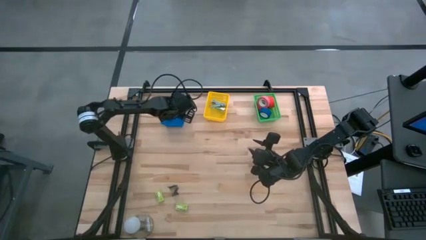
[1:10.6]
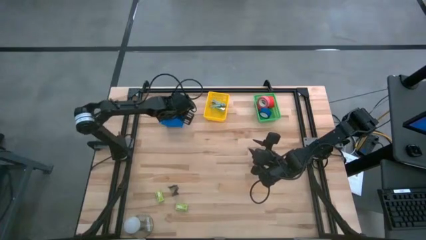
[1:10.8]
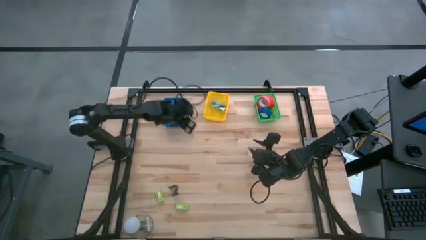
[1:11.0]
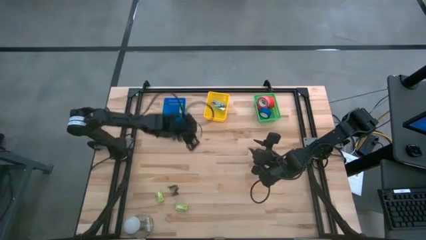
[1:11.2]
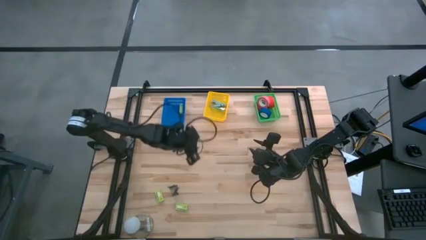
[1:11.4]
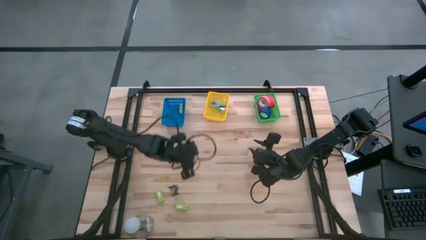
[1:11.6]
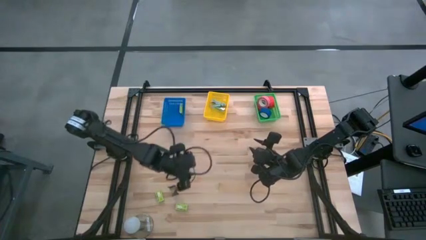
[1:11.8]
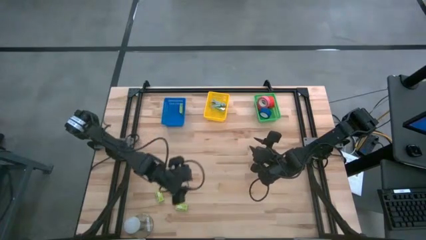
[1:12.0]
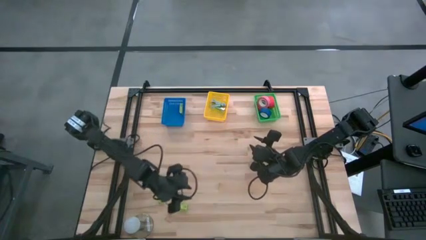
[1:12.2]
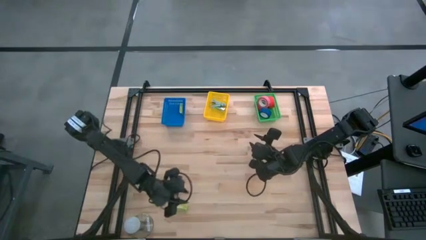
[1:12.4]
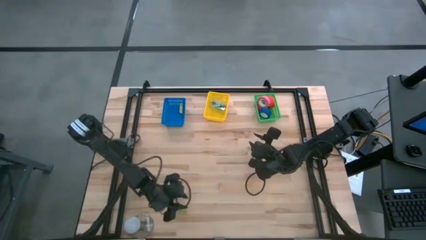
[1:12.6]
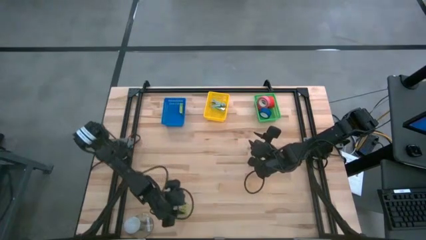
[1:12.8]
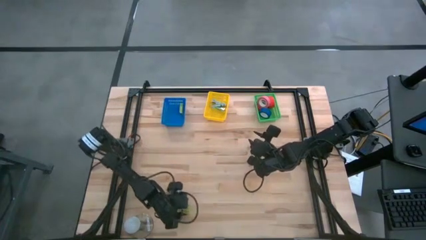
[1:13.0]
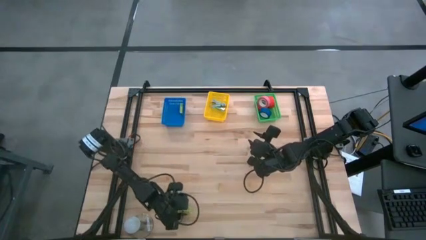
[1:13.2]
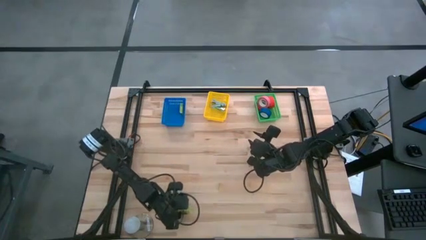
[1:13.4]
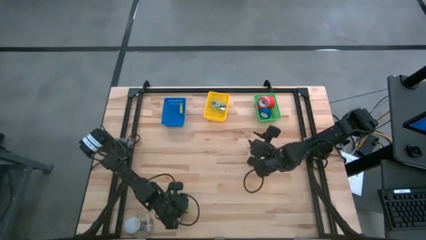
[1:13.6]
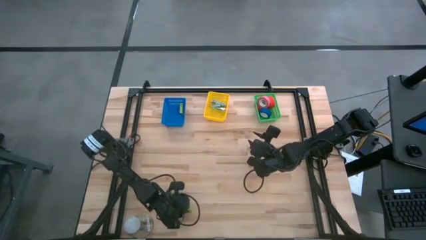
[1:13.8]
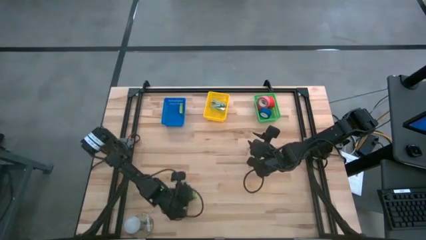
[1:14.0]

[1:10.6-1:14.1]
Task: Pick and place Stapler, Stapler remover, tape
Put the green staple box into the blue bin

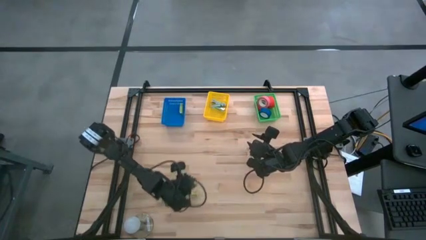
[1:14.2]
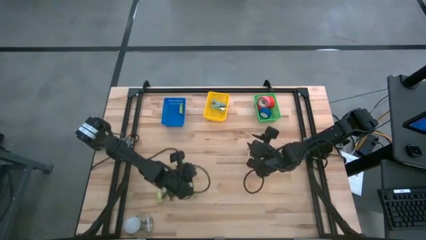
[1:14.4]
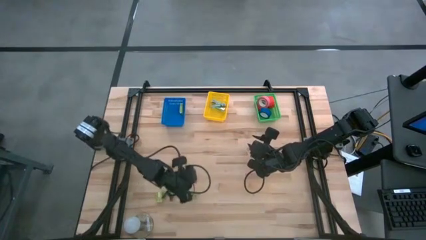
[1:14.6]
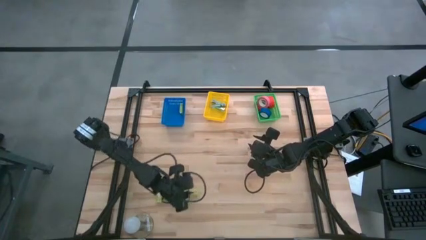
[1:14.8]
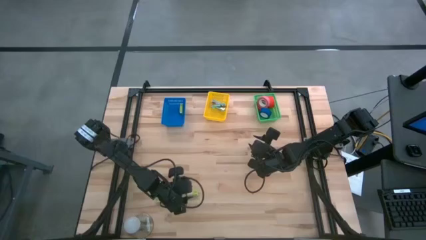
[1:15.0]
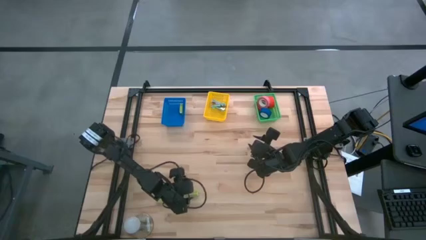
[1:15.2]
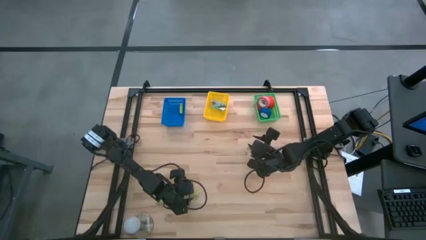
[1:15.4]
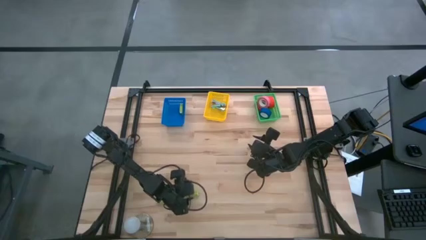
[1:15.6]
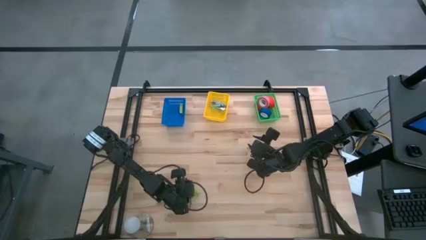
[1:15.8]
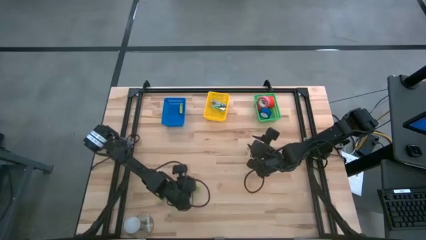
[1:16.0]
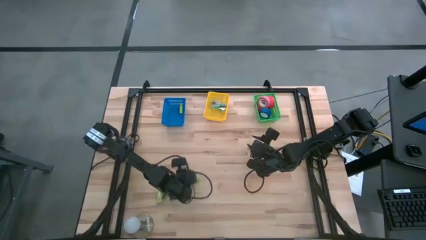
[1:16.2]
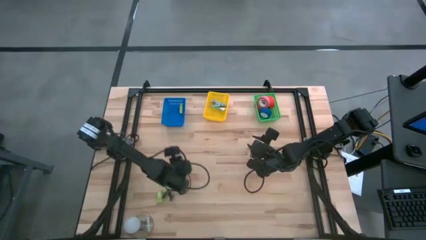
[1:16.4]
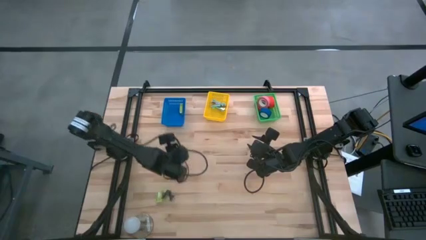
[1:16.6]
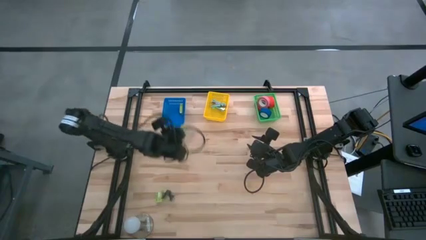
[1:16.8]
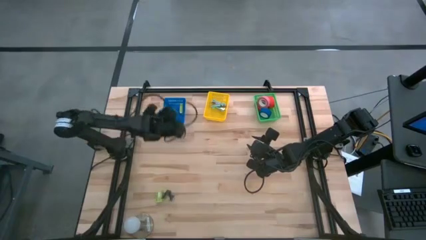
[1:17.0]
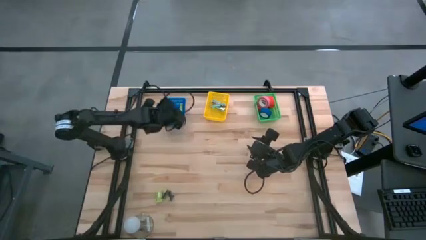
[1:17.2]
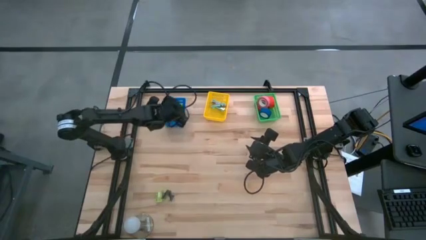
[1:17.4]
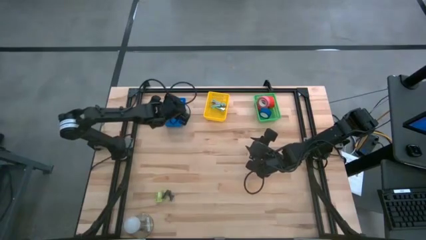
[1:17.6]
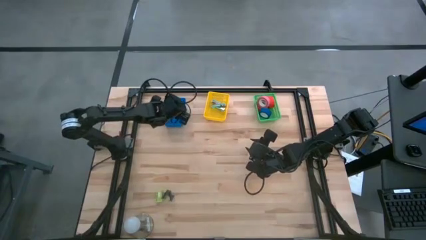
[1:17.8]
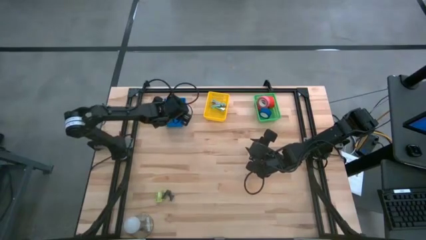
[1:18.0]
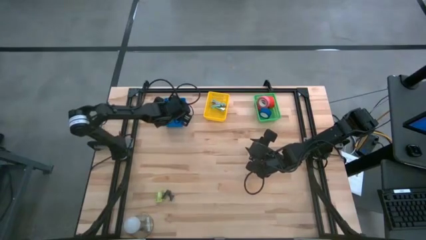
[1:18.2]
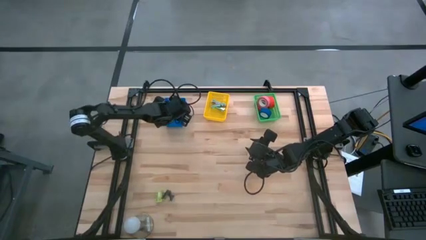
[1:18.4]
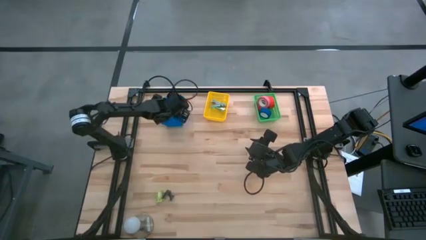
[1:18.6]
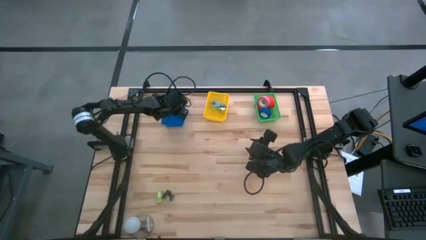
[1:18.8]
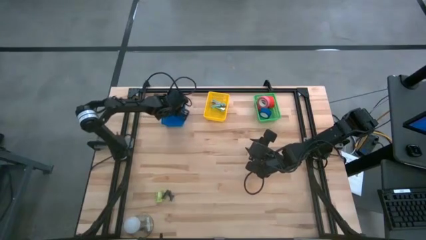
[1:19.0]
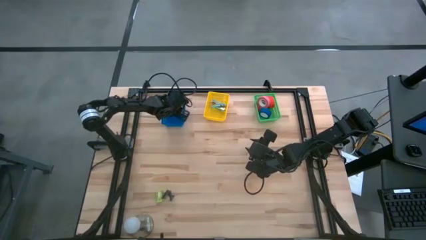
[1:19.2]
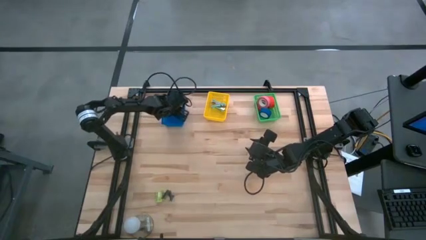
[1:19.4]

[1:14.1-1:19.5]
Put the green staple box into the blue bin

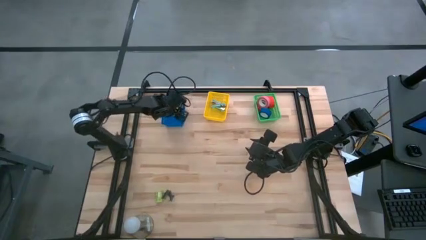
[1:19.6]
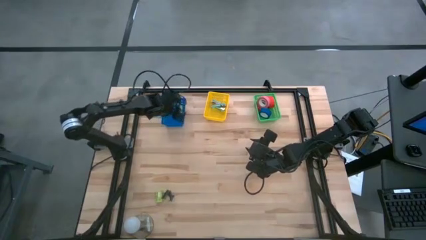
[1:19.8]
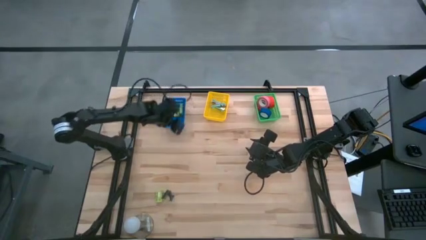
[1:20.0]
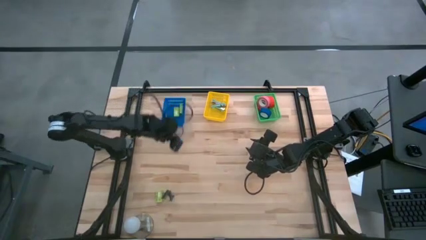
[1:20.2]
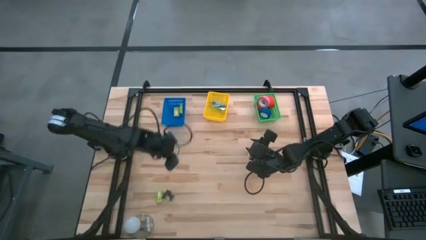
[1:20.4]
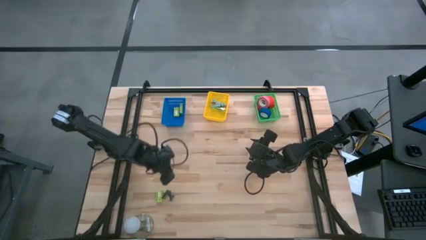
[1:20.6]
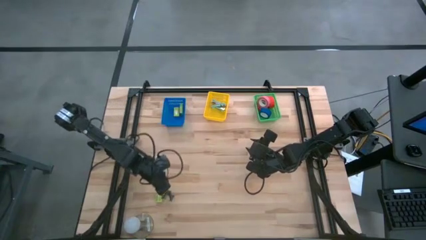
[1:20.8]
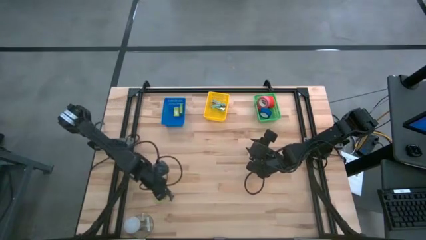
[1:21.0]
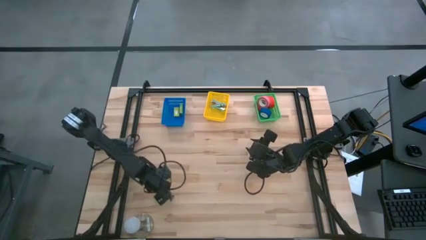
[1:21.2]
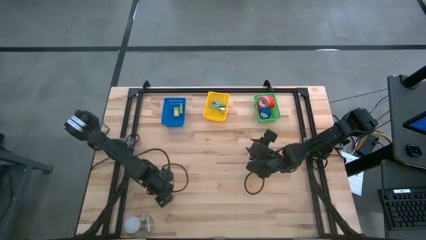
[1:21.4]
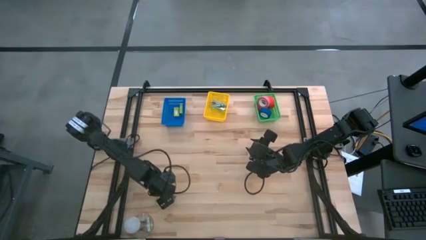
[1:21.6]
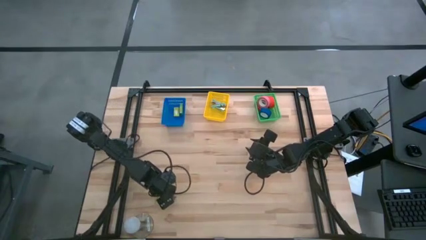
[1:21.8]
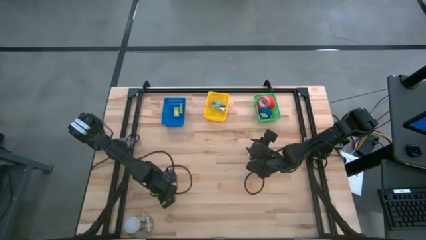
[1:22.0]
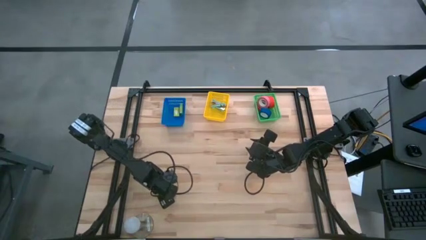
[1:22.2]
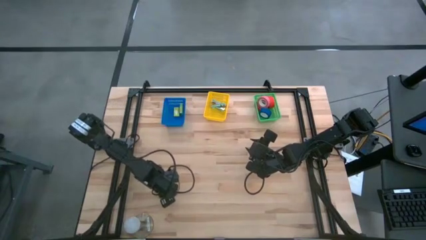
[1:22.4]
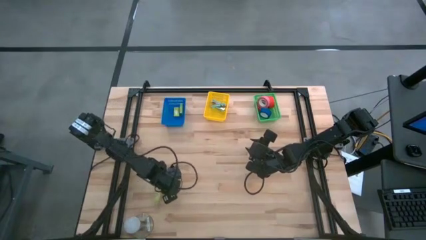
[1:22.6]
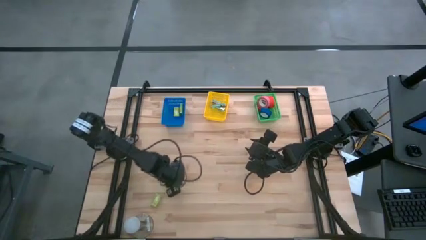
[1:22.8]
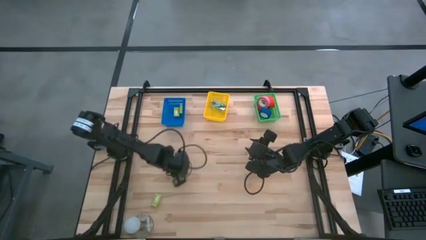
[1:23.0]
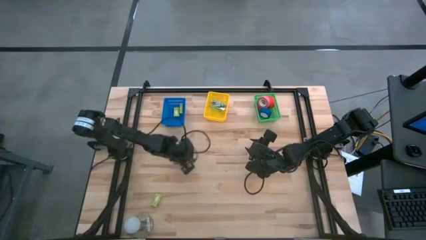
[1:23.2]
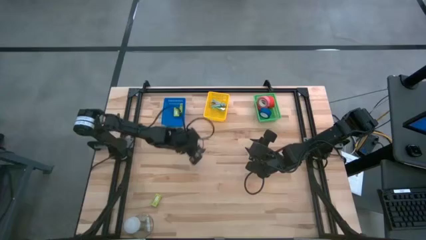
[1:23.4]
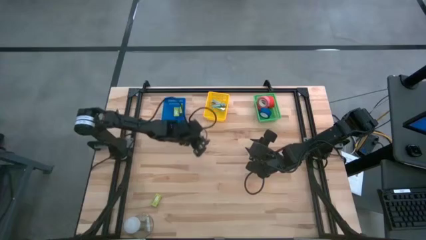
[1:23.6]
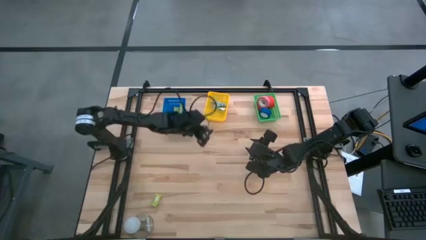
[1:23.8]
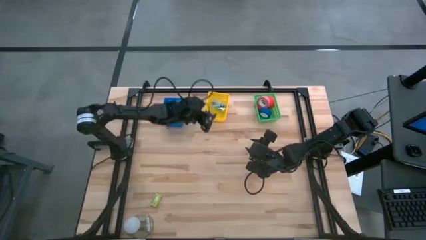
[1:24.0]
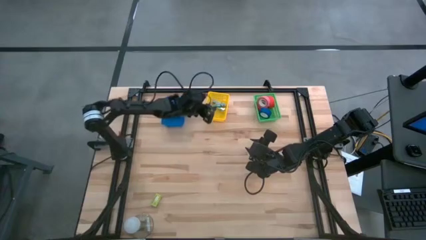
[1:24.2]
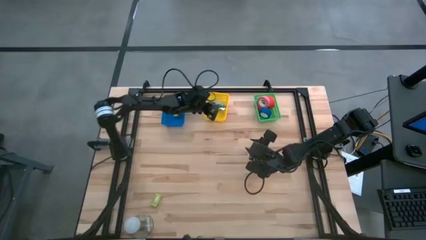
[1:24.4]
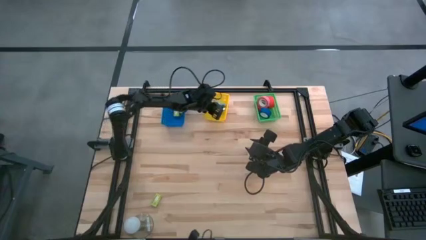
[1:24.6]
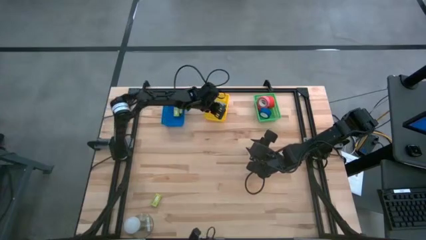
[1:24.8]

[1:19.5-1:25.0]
Put the black staple remover into the yellow bin

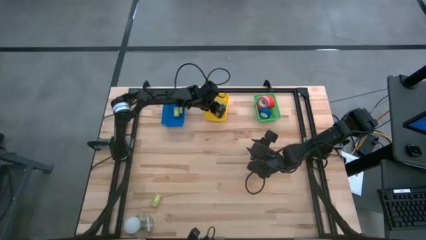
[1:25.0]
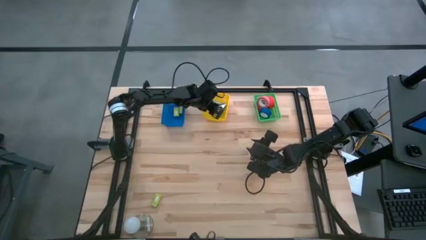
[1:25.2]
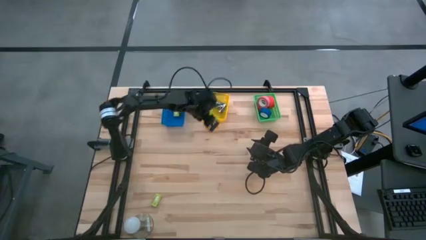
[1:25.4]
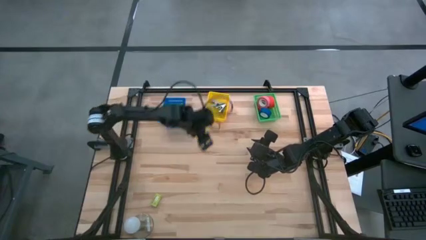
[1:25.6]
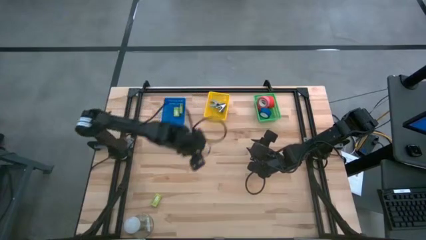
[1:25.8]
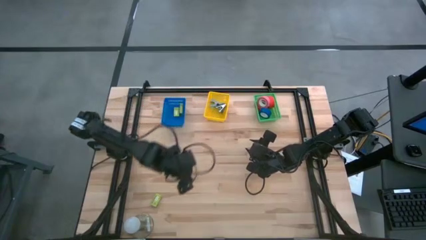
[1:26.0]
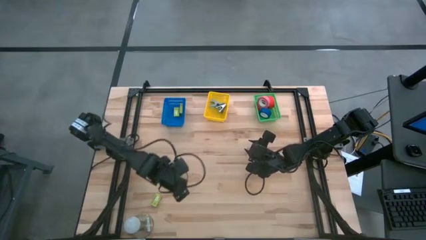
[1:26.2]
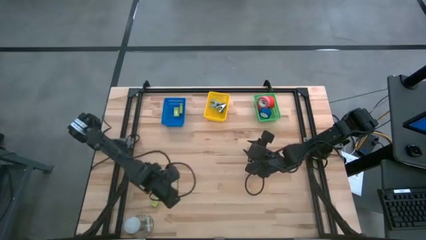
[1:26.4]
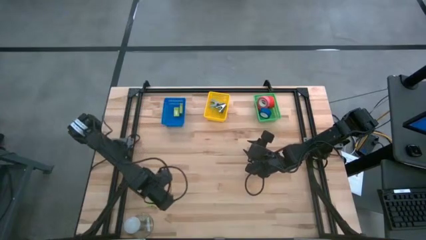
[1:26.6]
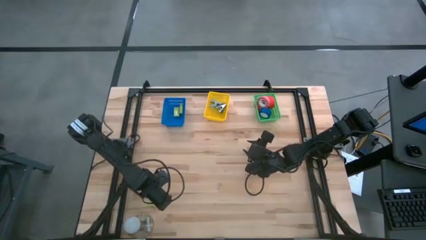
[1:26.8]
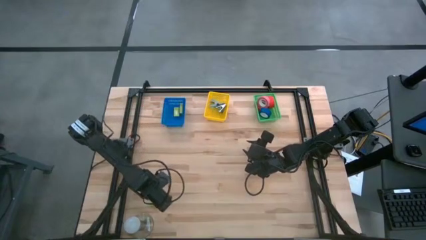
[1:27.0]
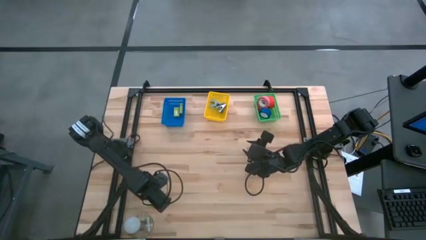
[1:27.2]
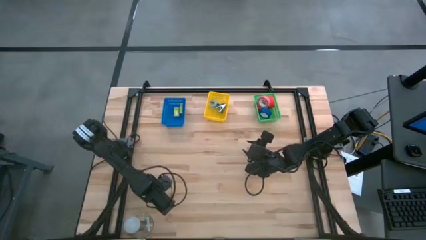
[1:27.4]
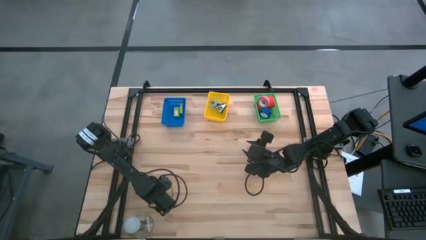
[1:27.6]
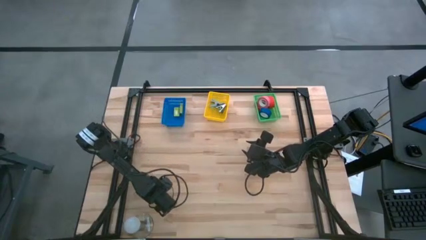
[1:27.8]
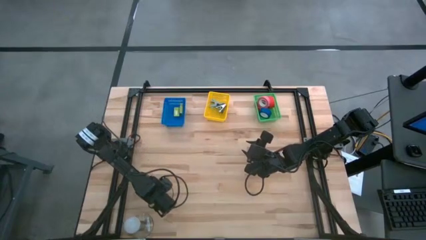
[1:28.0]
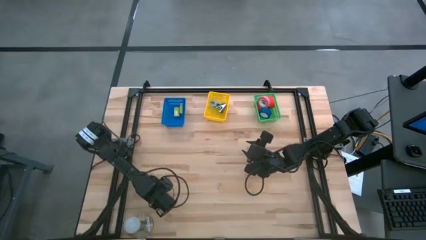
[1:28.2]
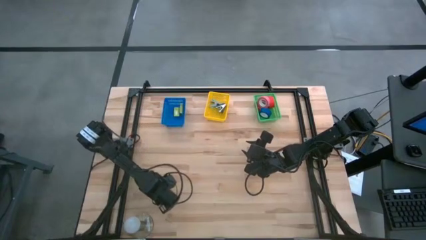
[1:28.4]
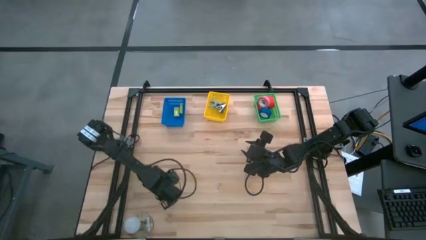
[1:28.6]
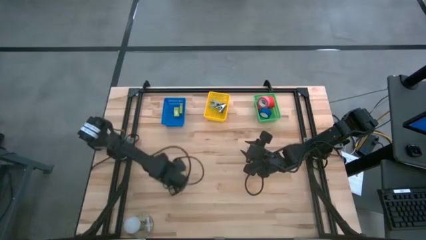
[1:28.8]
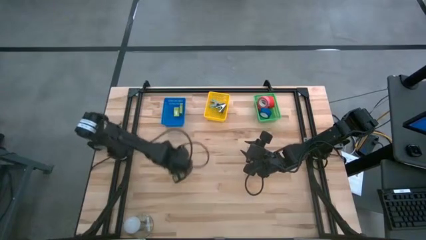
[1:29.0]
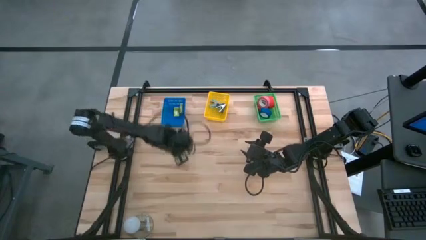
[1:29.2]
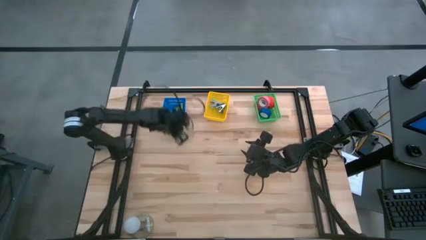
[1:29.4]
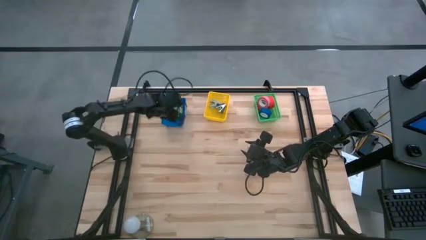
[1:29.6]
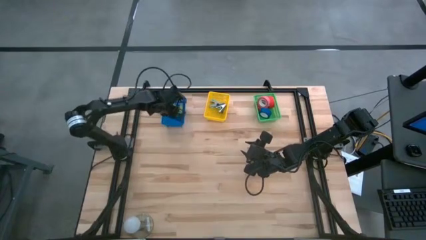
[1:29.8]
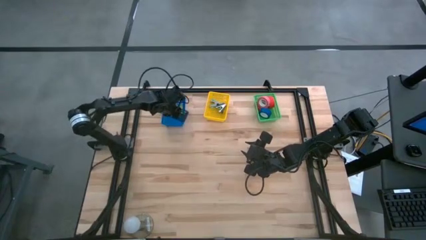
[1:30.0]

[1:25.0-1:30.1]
Put the green staple box into the blue bin
